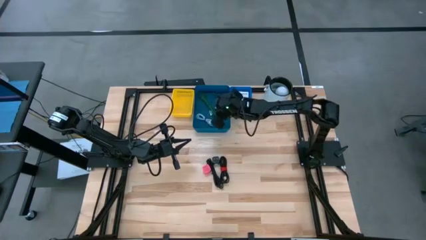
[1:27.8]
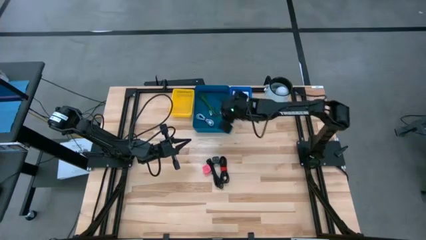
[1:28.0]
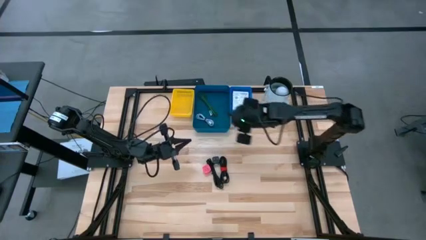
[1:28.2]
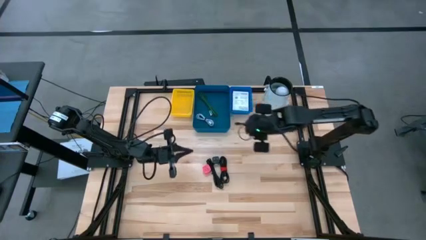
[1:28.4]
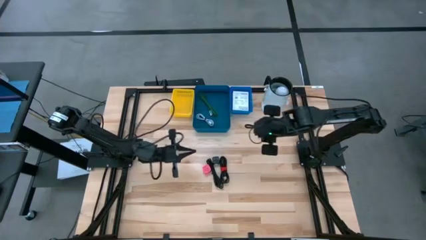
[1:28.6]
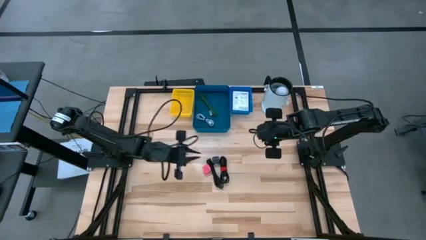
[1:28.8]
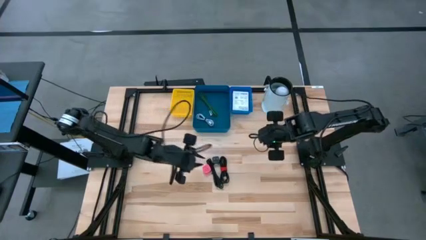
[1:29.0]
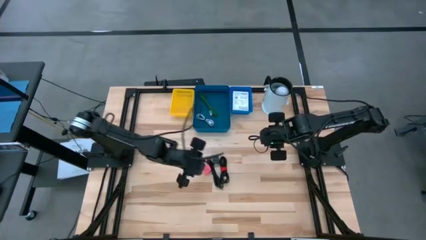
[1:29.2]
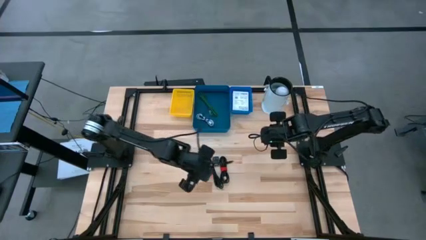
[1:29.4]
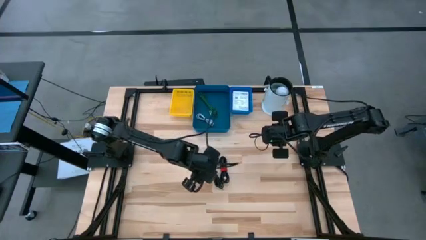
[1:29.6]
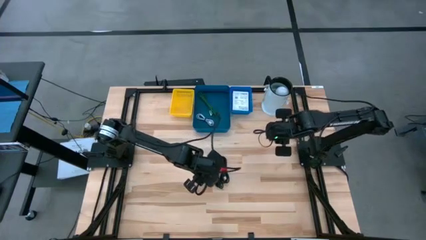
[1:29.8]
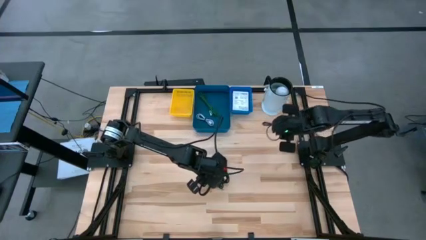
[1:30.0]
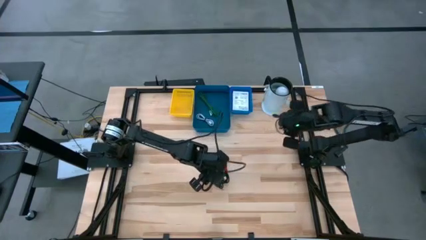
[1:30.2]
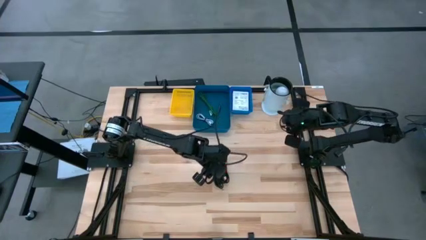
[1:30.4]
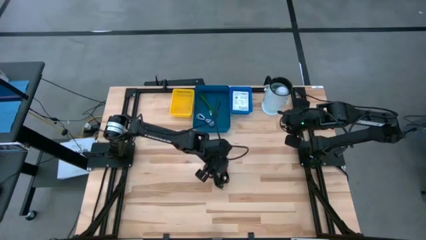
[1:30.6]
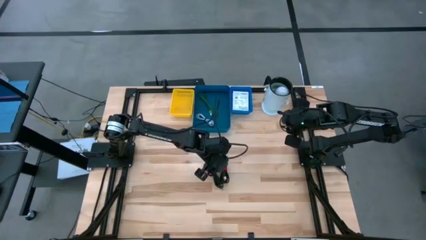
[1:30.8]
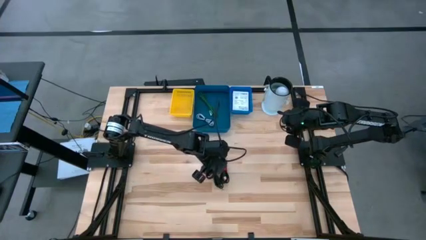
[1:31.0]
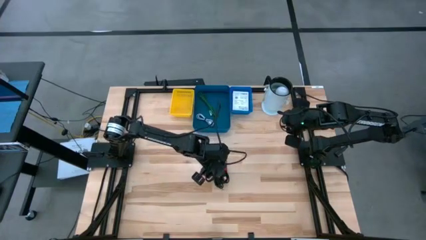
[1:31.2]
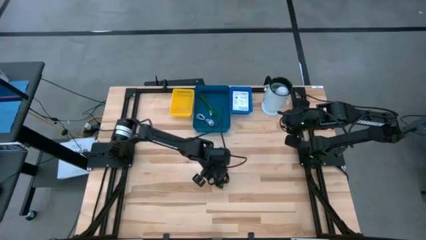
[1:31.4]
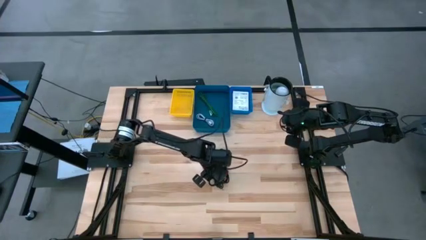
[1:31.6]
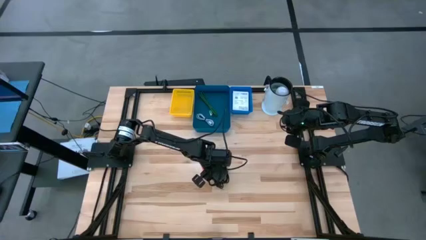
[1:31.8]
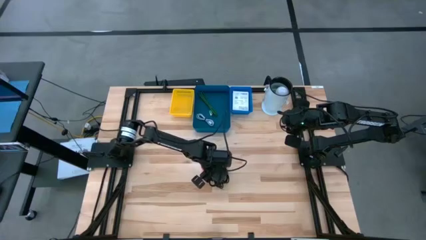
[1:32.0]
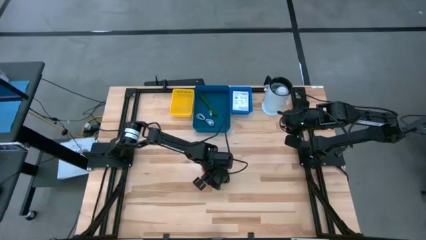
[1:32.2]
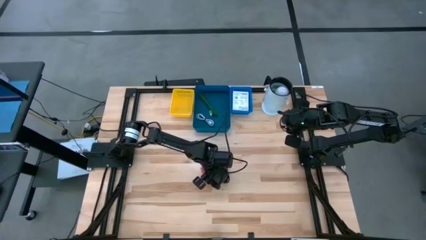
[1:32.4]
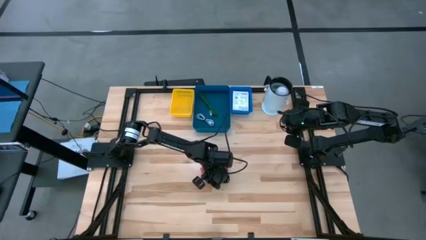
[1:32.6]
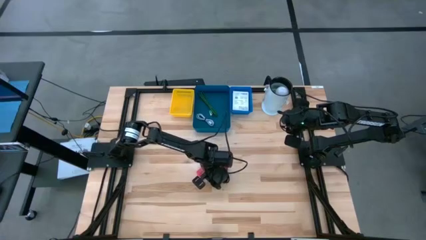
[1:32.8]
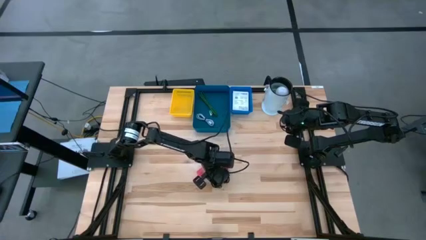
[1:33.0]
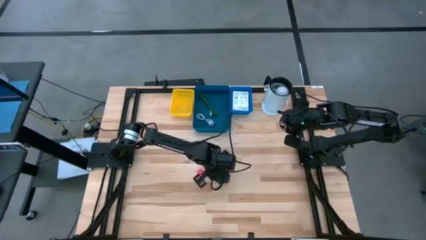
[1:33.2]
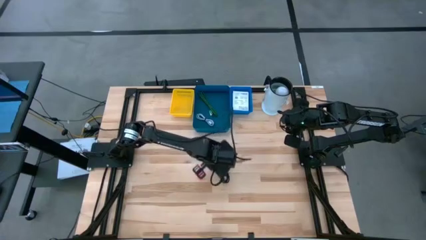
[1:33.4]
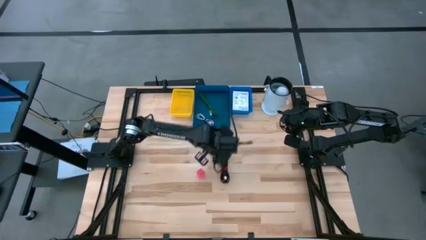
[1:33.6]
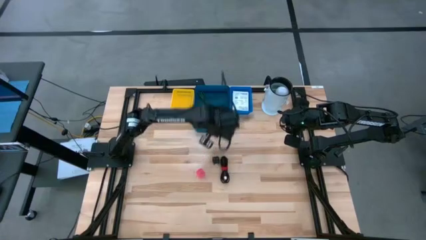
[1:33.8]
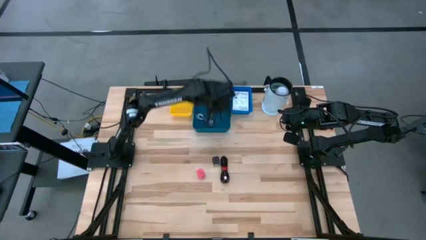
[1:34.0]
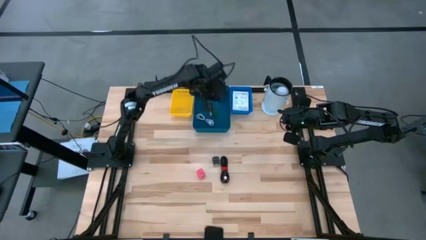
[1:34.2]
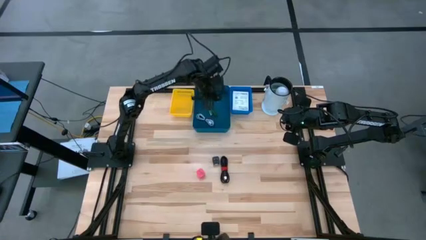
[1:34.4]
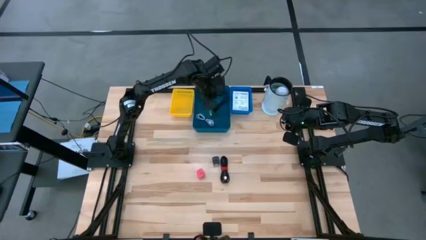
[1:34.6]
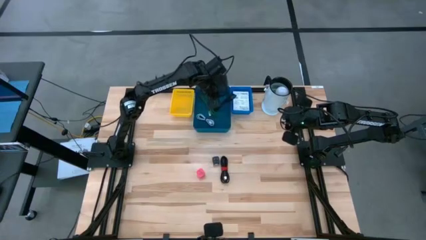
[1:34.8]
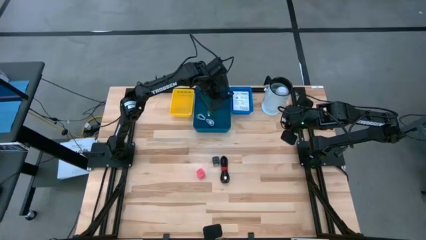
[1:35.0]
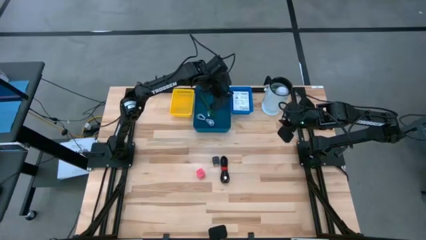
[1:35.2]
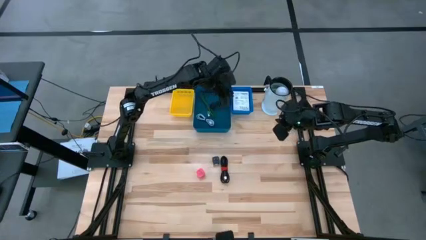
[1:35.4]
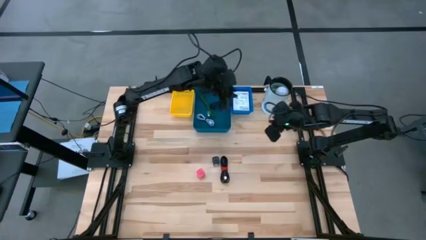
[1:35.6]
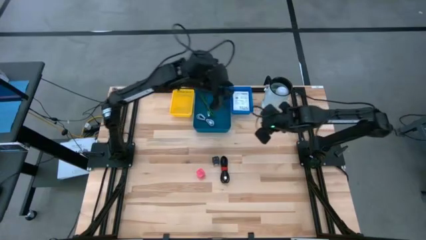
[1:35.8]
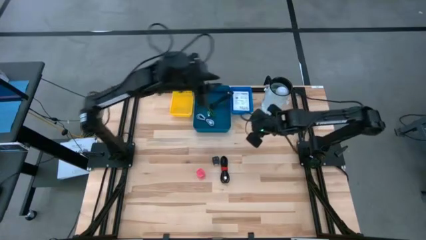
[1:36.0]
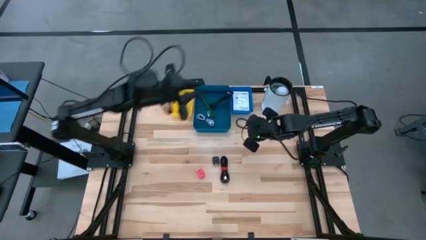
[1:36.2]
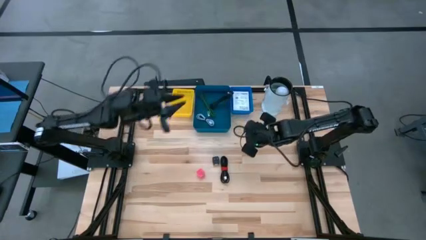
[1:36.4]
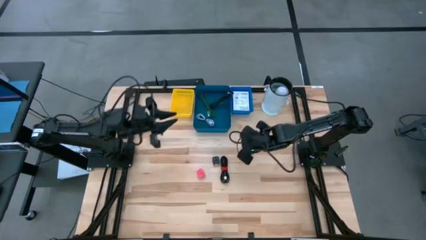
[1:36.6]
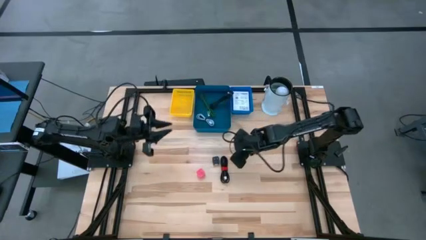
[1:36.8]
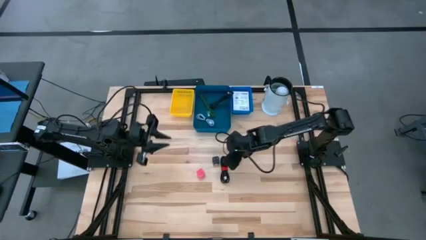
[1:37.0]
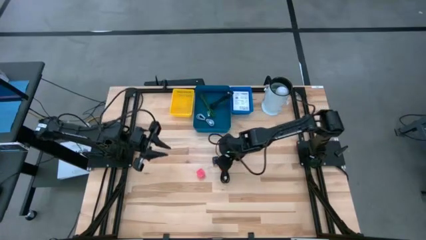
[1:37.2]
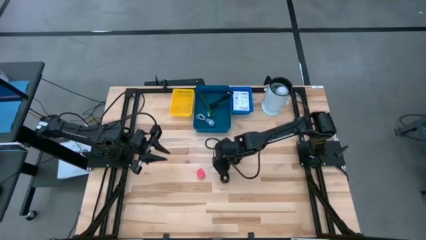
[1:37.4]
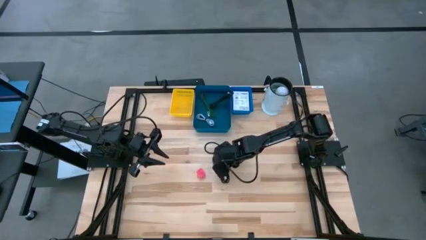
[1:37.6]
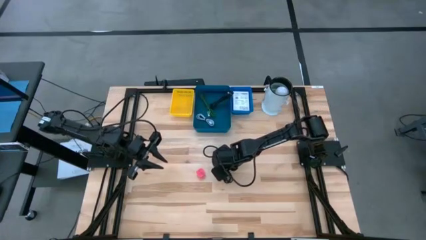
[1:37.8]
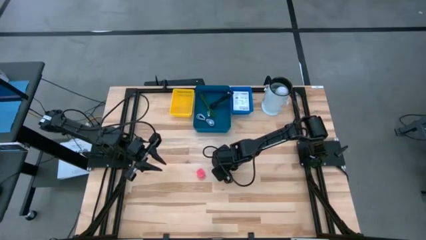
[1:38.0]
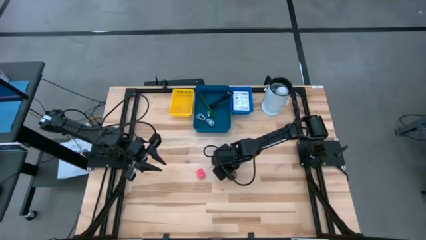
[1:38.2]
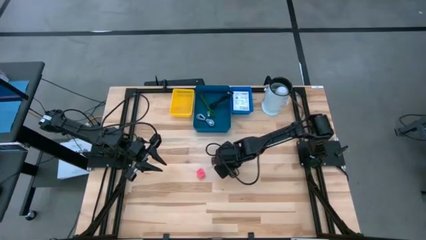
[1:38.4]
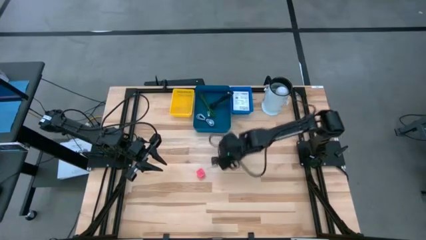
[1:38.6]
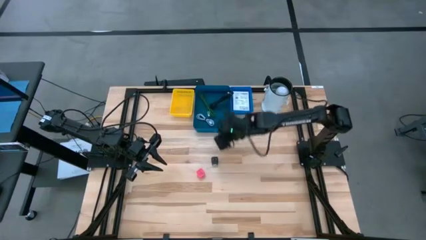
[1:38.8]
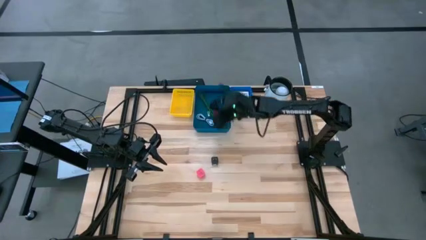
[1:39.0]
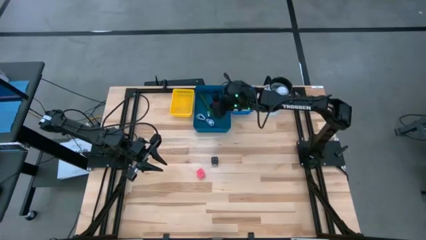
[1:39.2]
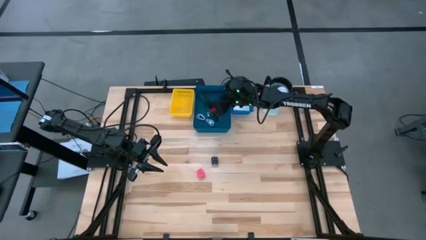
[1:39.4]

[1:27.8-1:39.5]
Task: Pick and place items into bin
Put the black charger cable into the dark blue bin

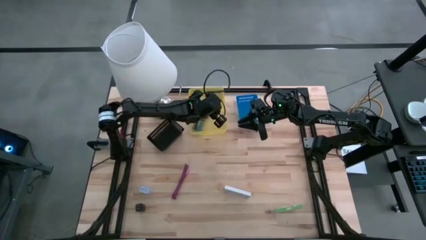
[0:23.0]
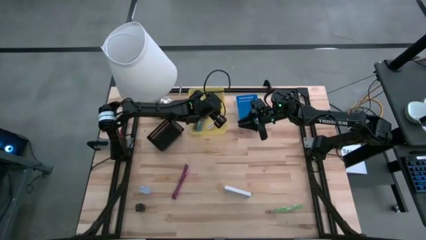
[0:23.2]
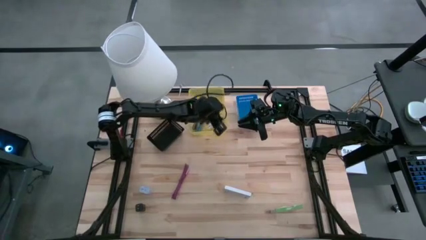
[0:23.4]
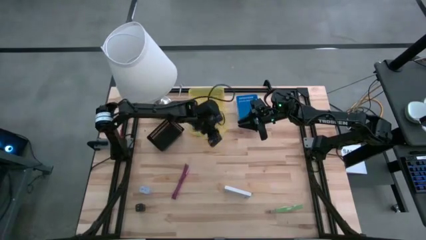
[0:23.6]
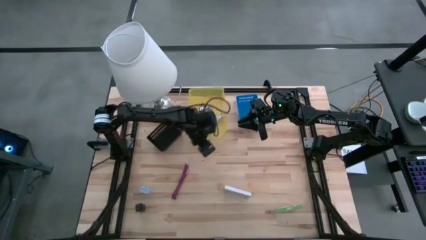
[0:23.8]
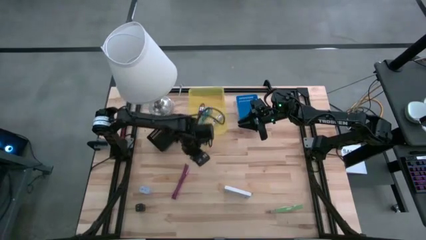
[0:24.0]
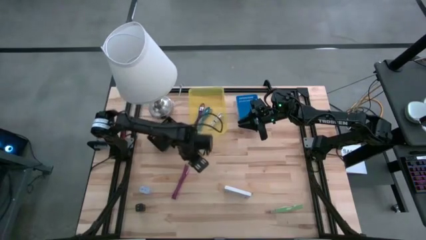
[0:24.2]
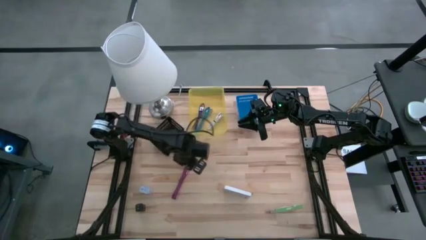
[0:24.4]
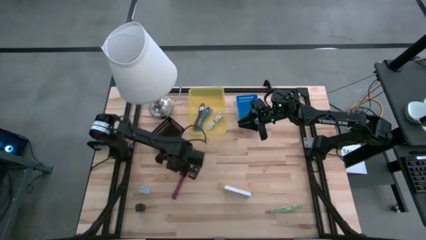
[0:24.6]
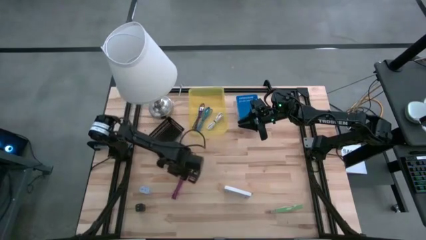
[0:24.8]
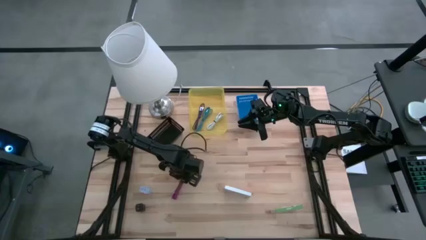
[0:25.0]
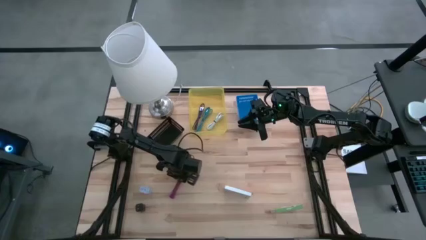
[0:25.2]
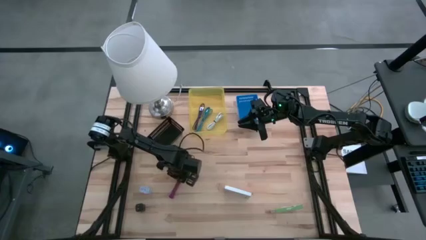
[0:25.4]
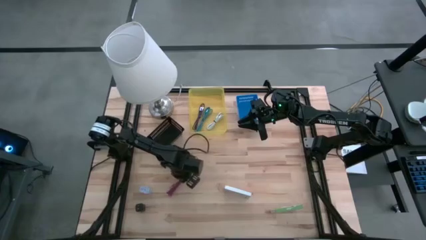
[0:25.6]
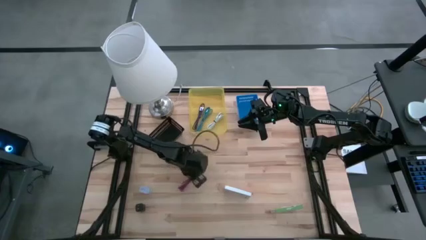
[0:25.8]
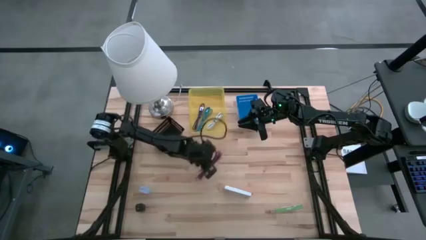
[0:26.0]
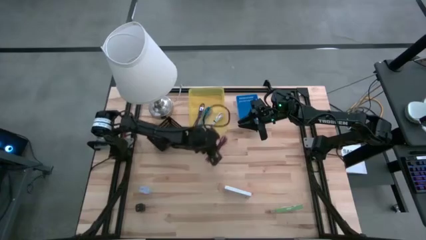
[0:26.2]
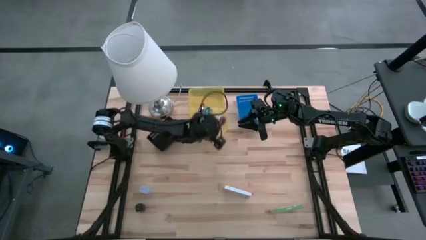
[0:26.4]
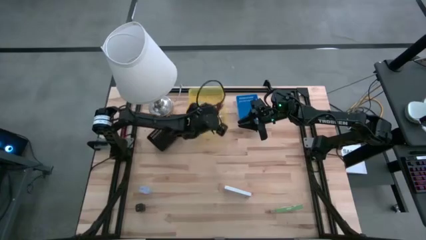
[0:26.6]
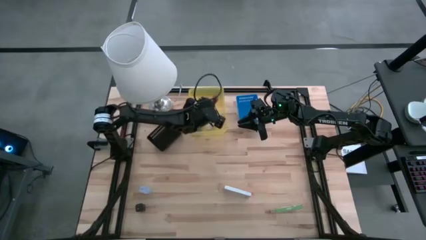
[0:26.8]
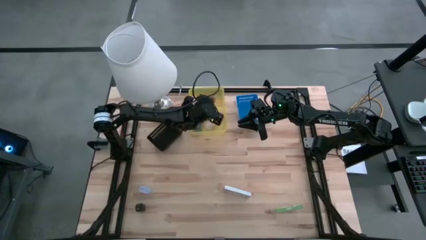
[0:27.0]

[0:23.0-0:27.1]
Task: Pick and place items into bin
Put the pink charger cable into the yellow bin
